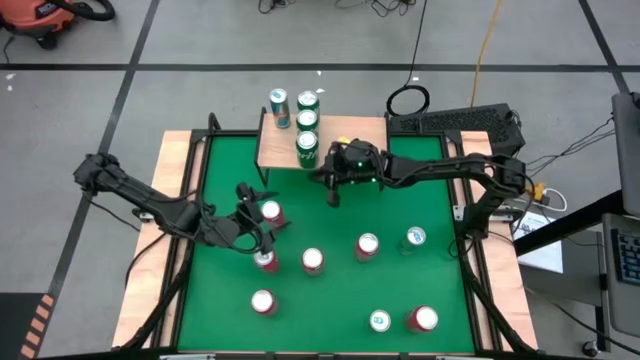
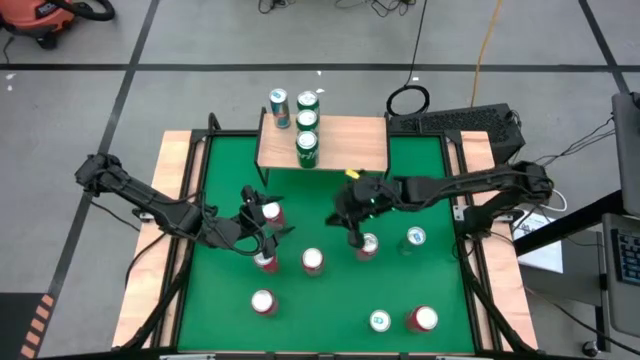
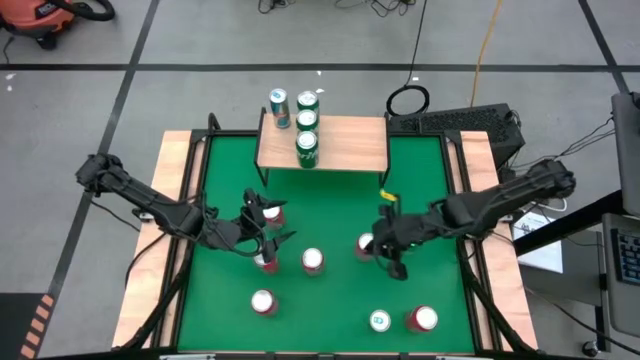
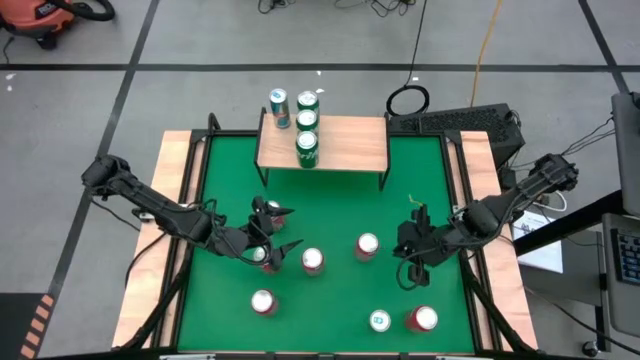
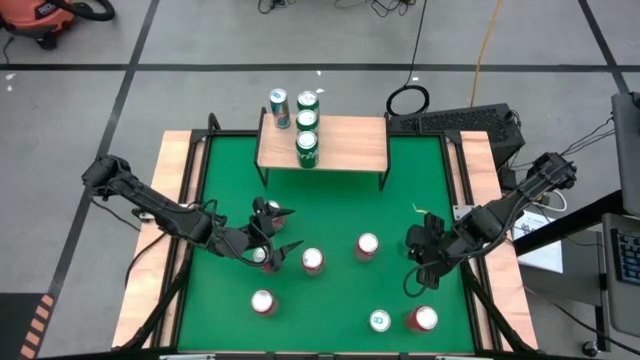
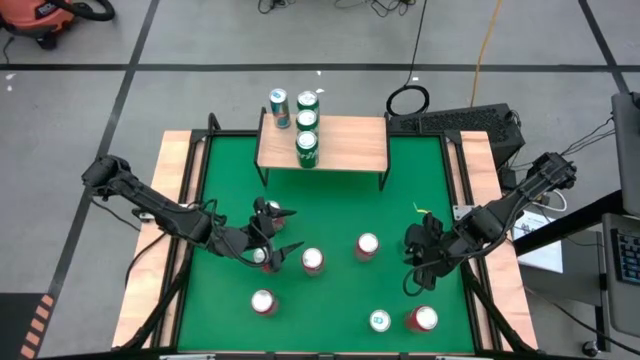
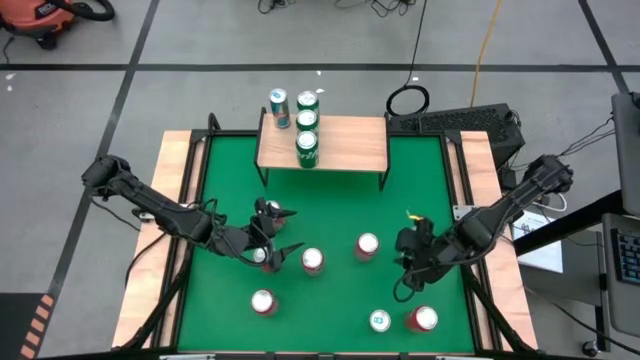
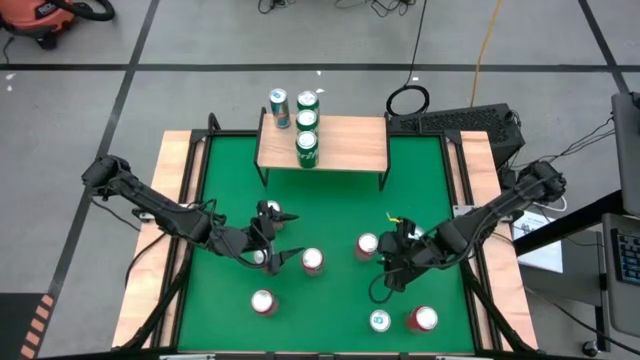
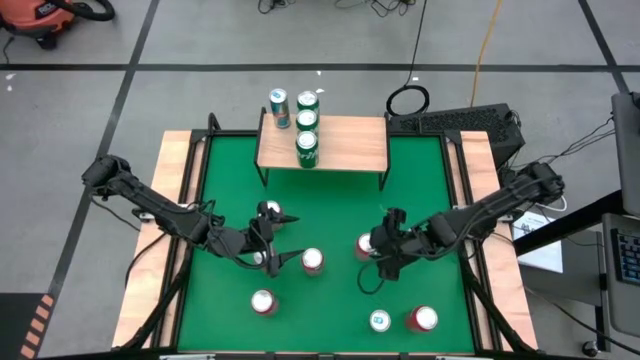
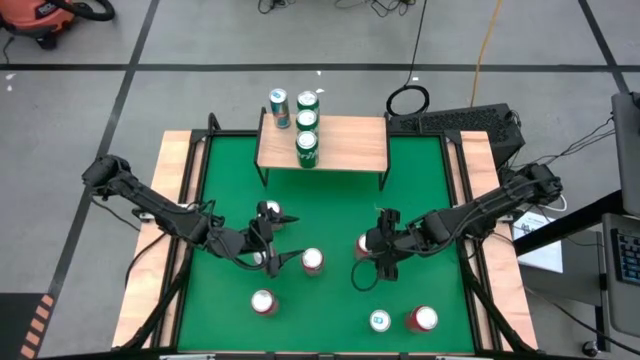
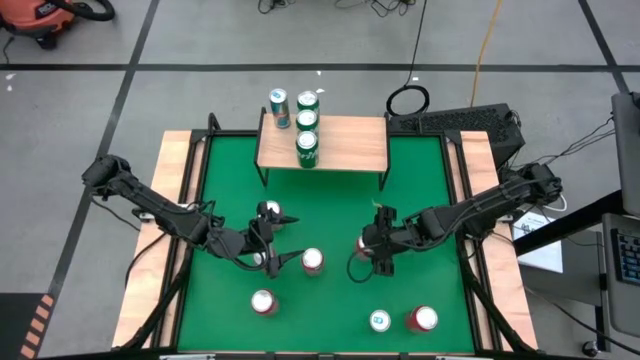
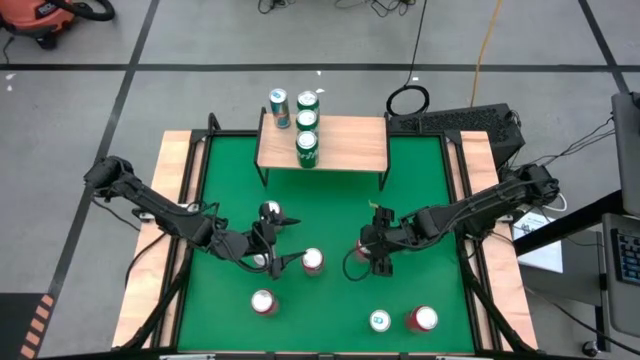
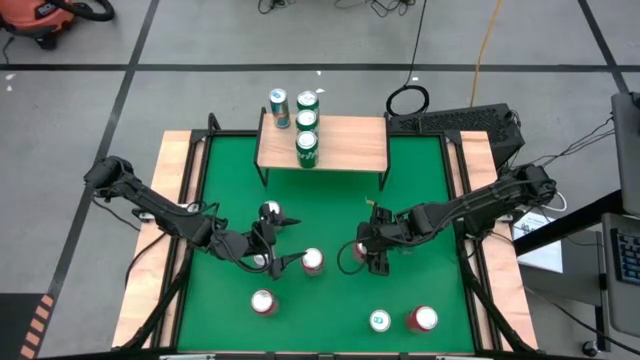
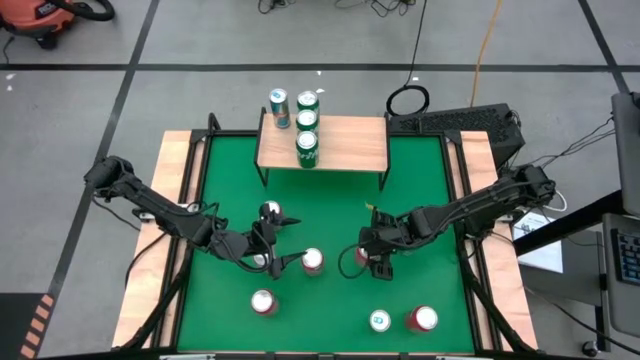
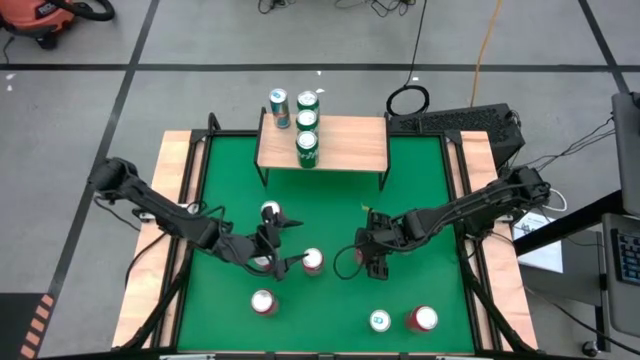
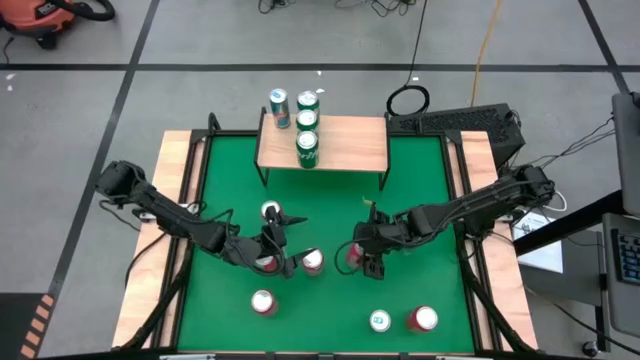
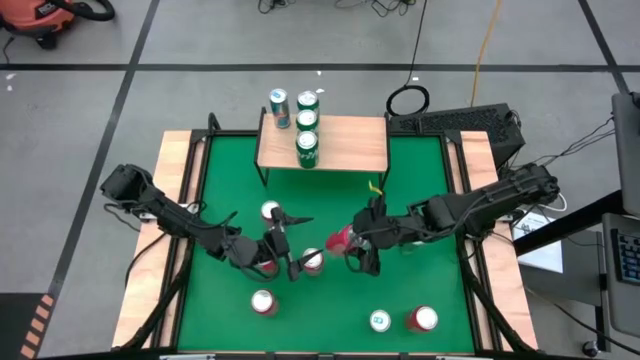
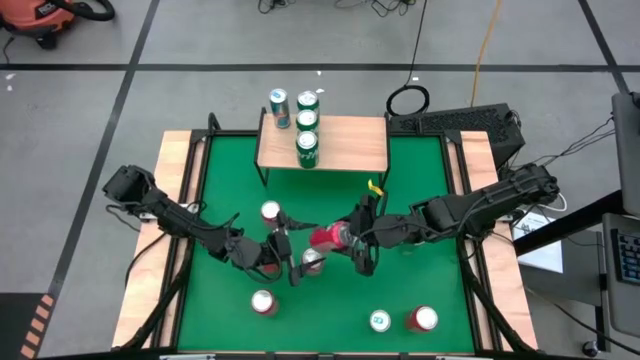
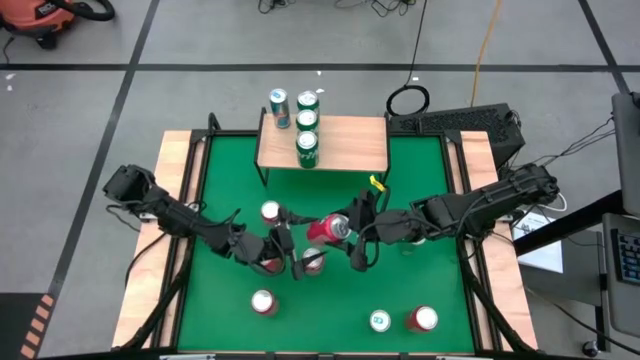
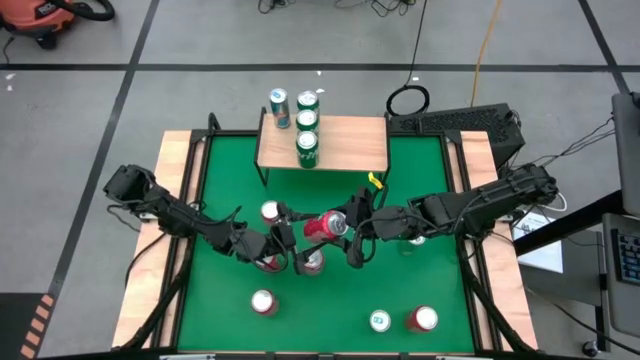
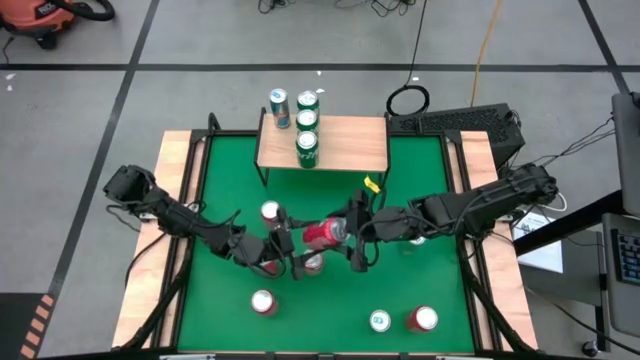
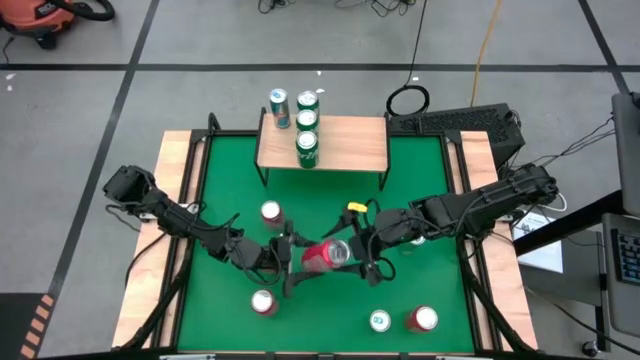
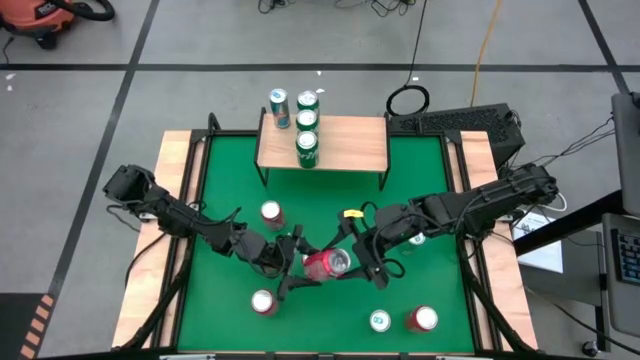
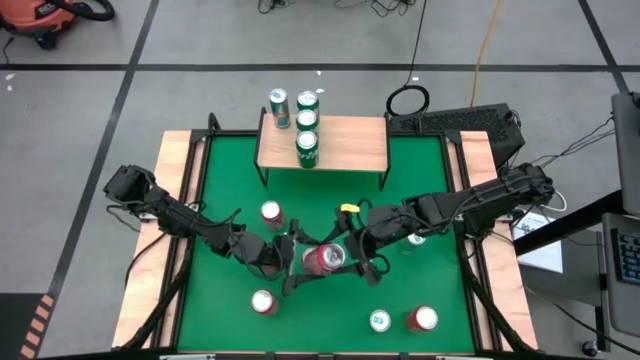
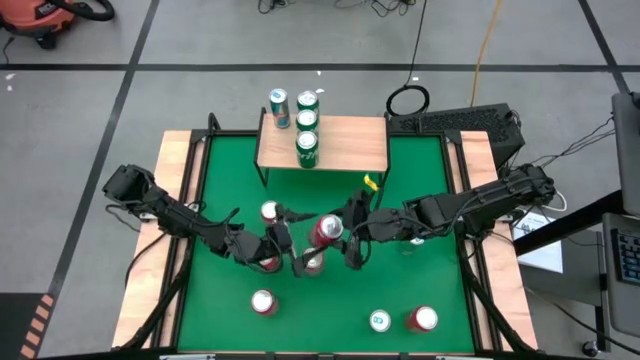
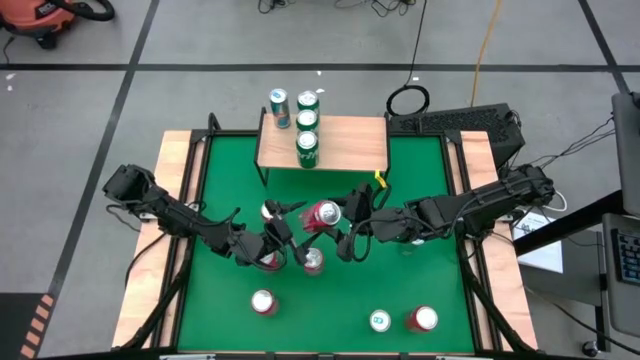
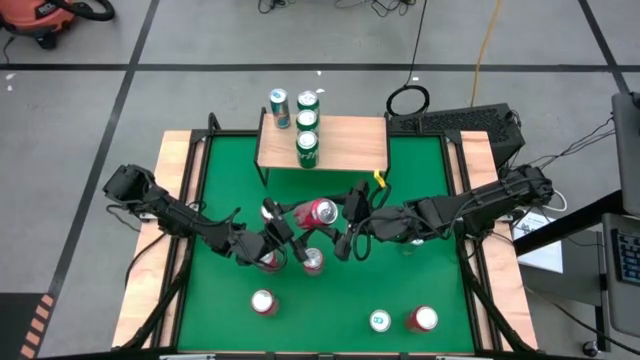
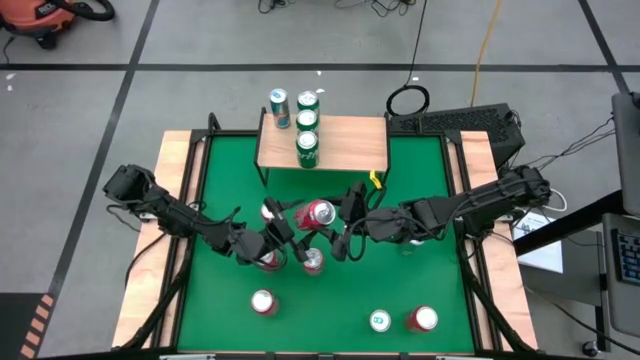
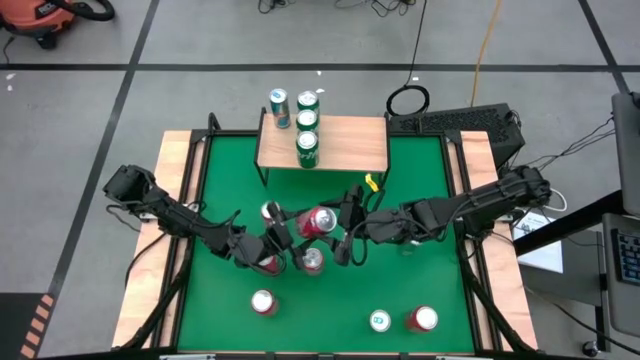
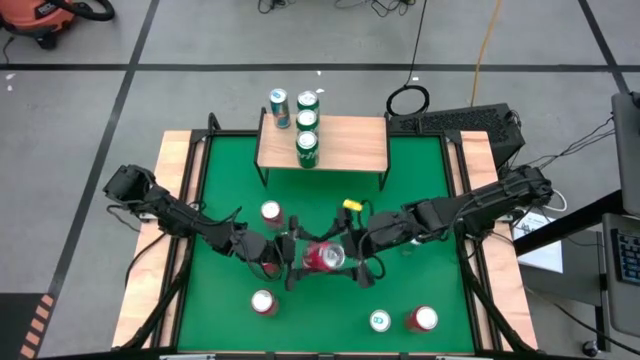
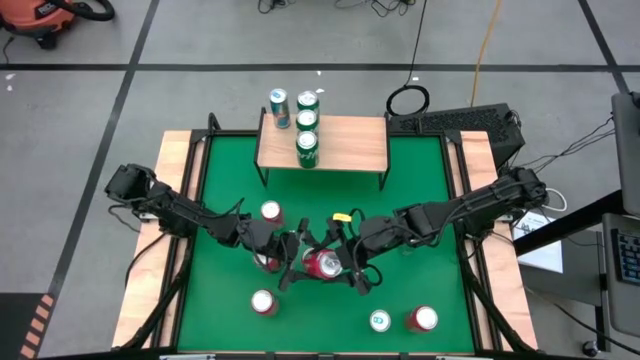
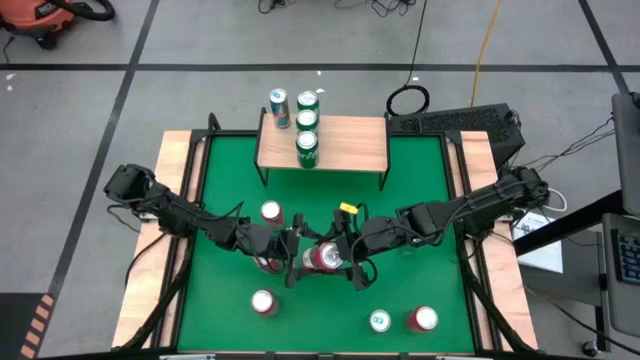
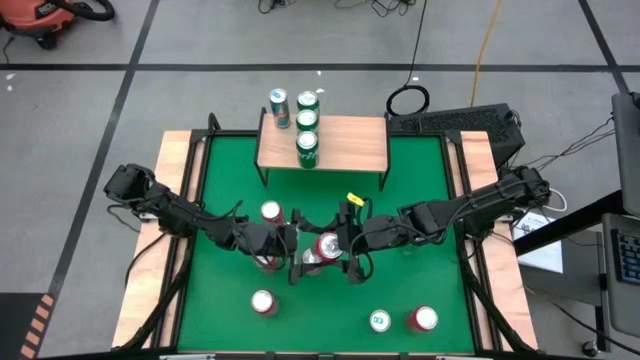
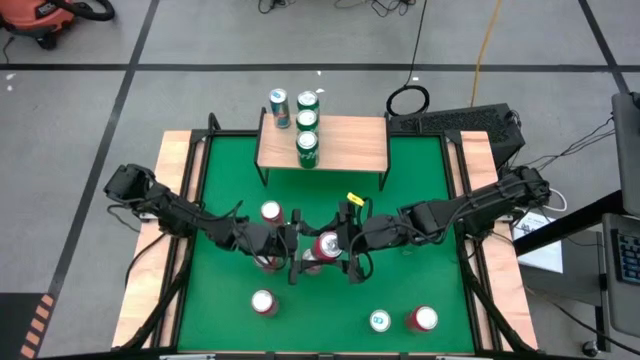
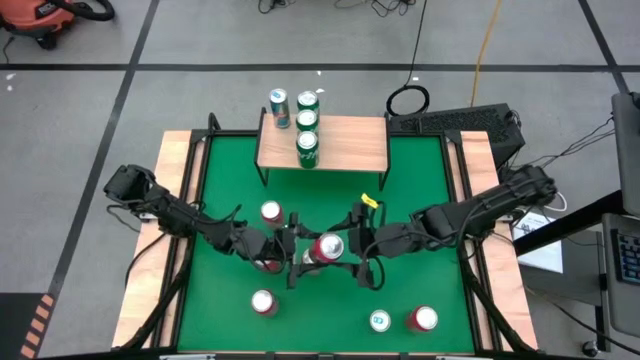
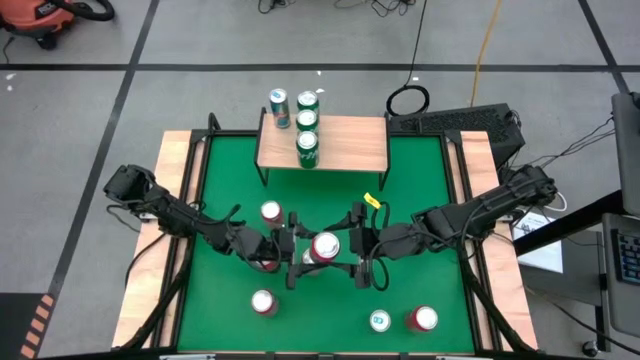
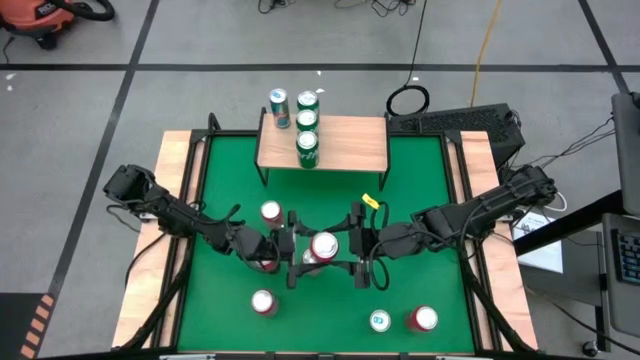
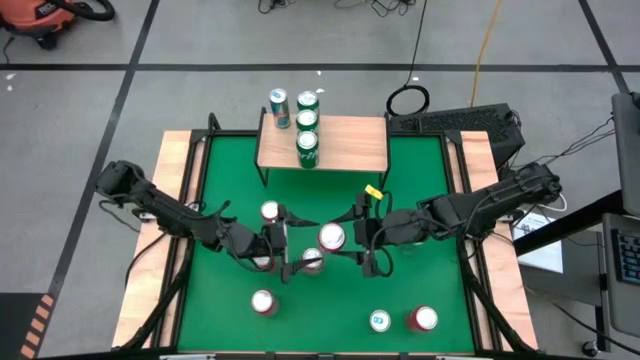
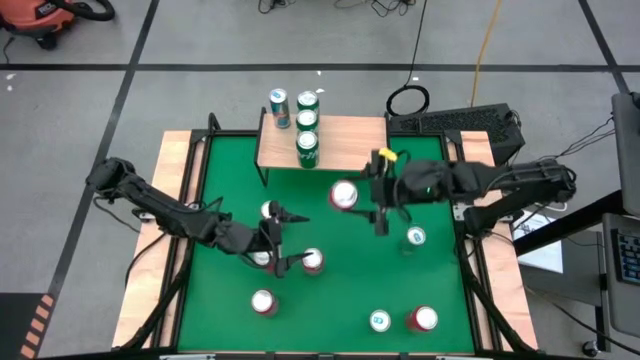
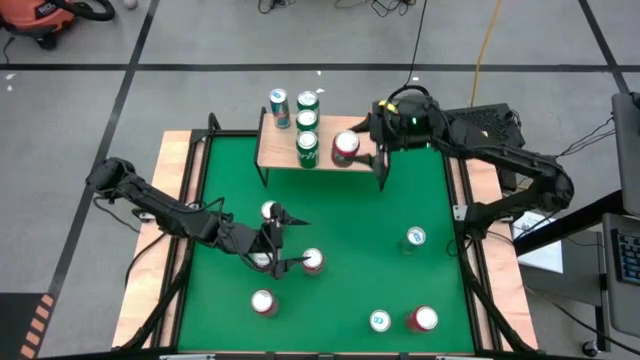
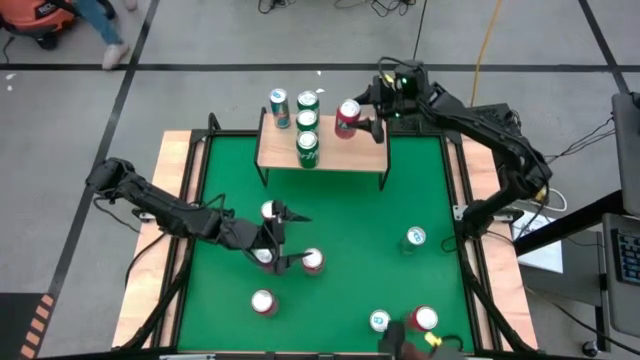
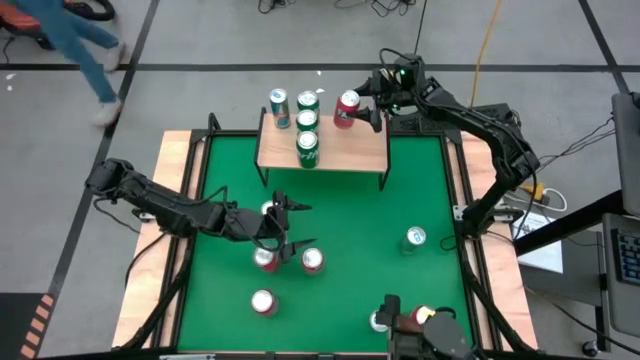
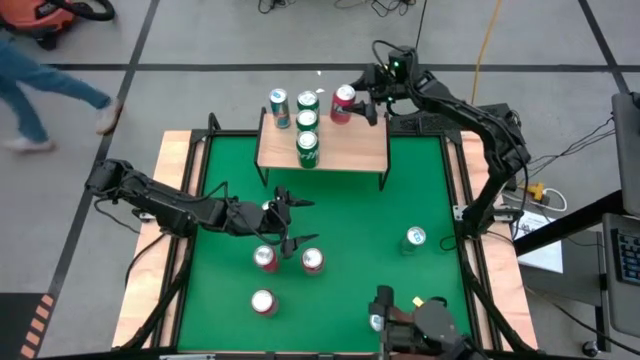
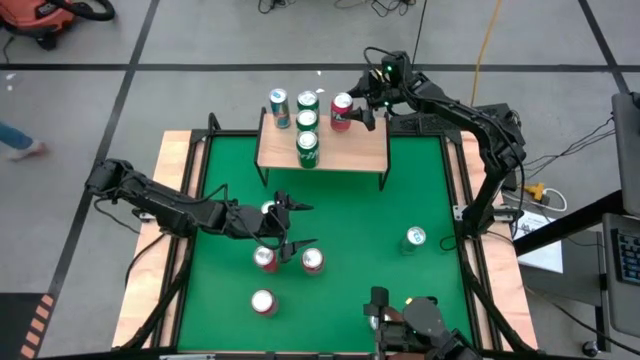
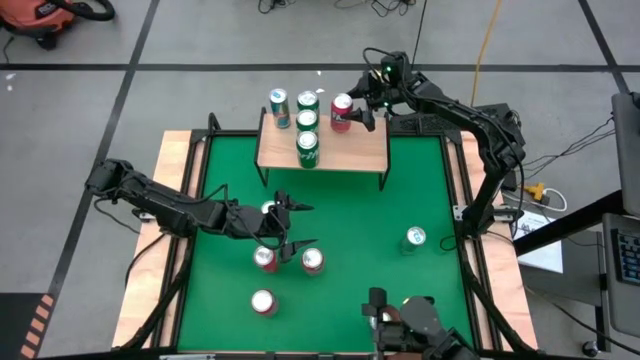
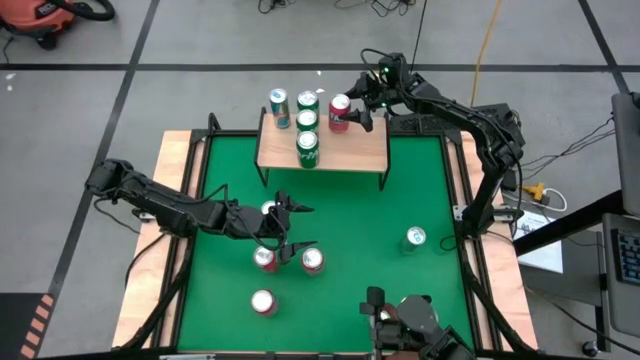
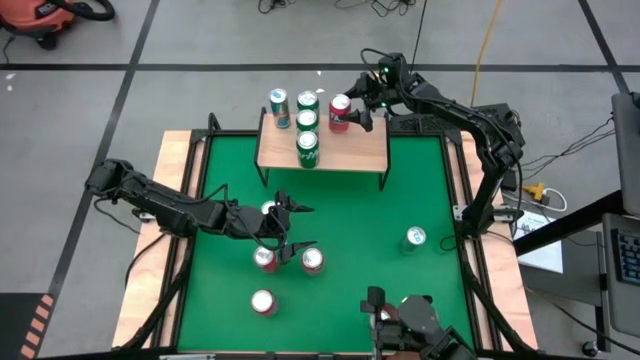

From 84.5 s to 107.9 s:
Task: Place canned beverage on shelf
Put the orange soda can on the shelf
